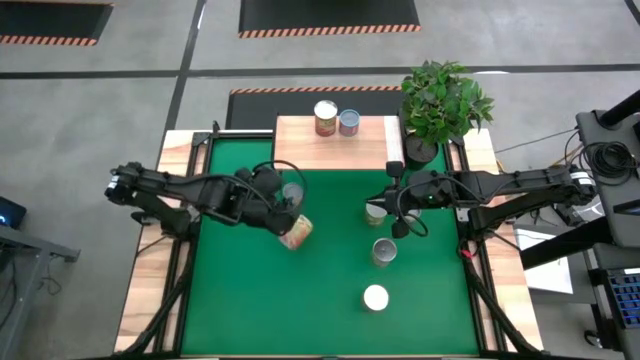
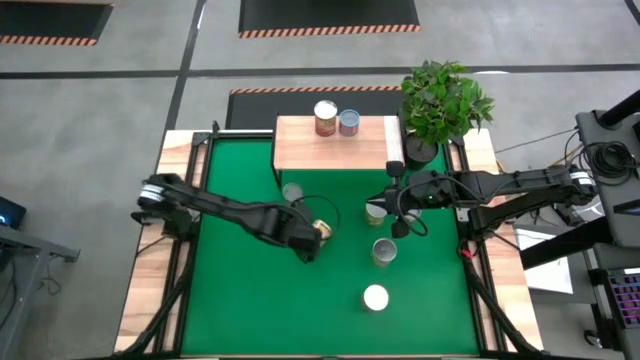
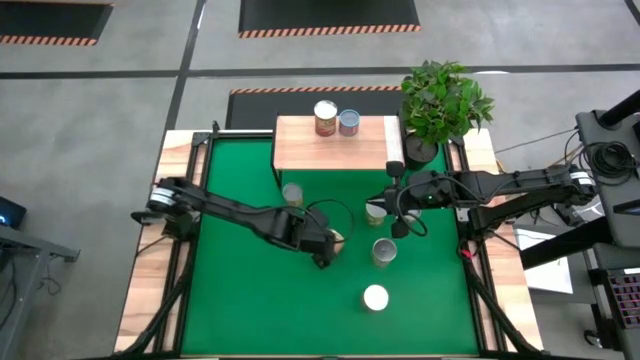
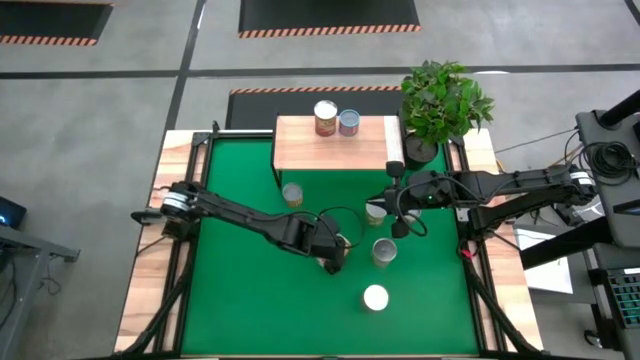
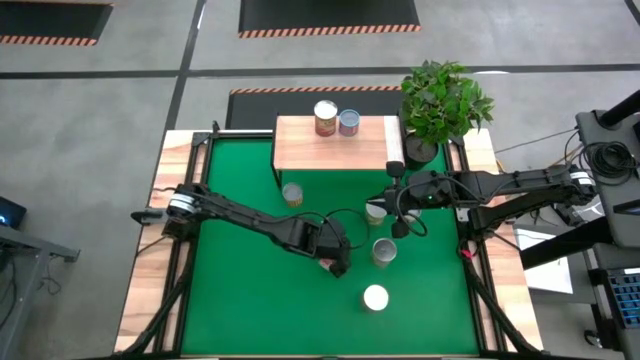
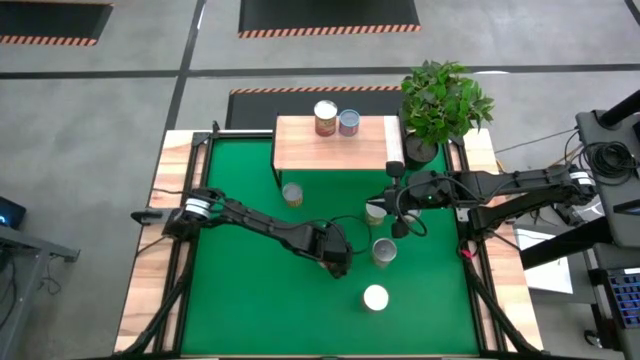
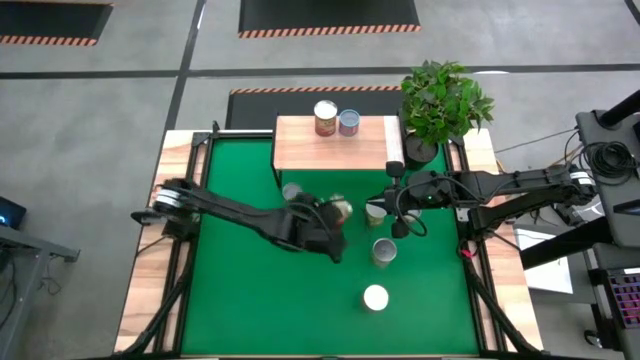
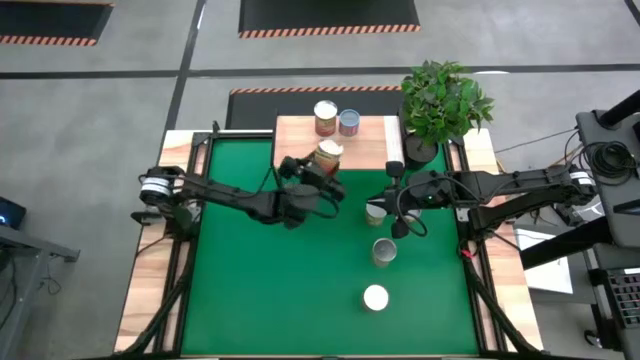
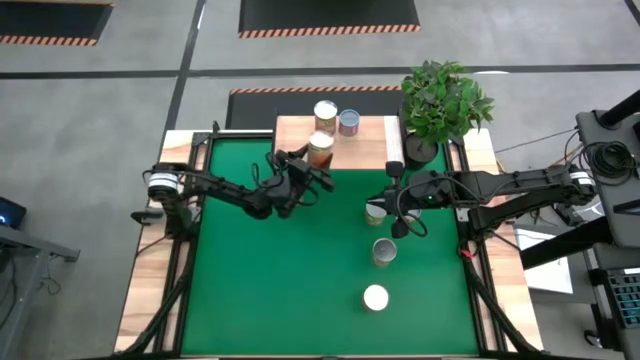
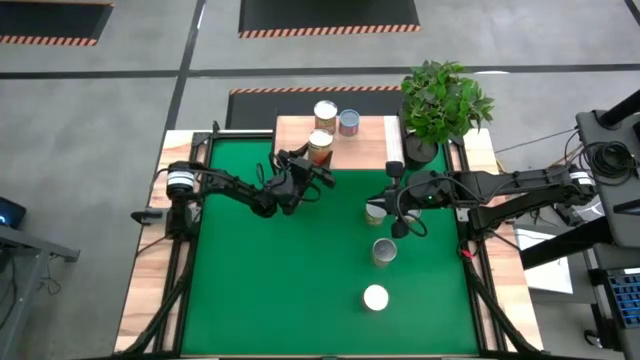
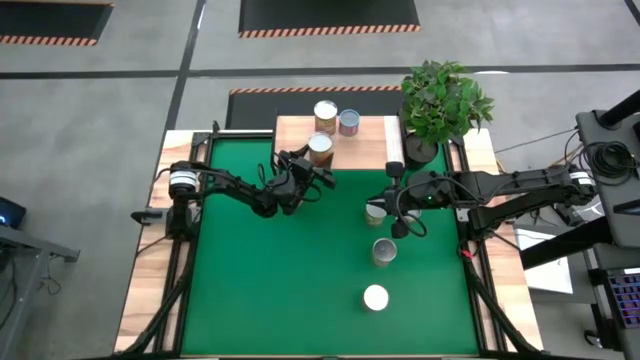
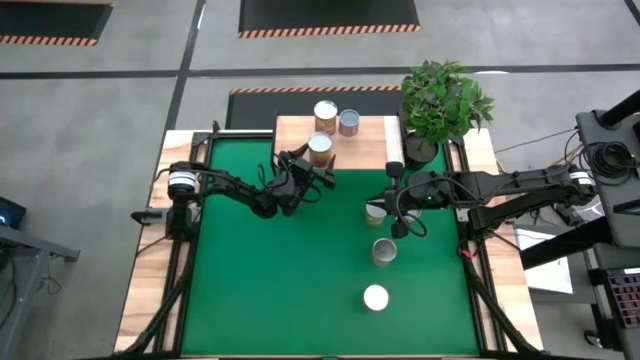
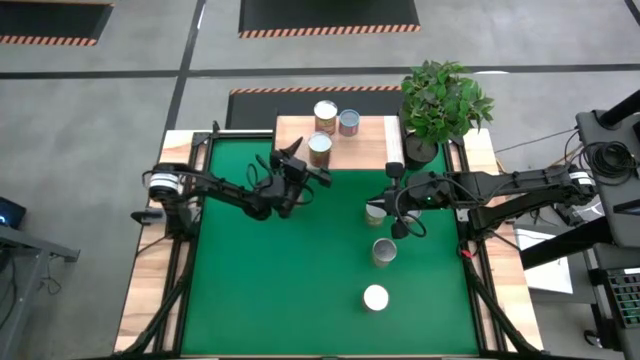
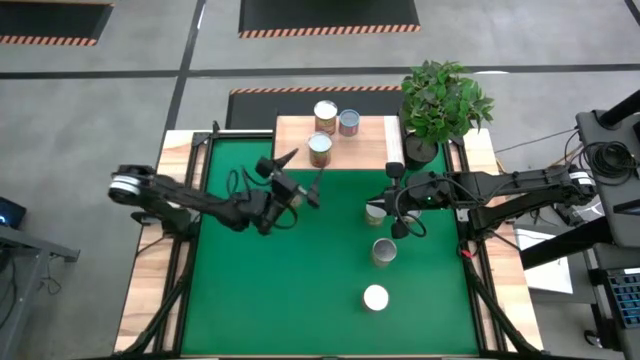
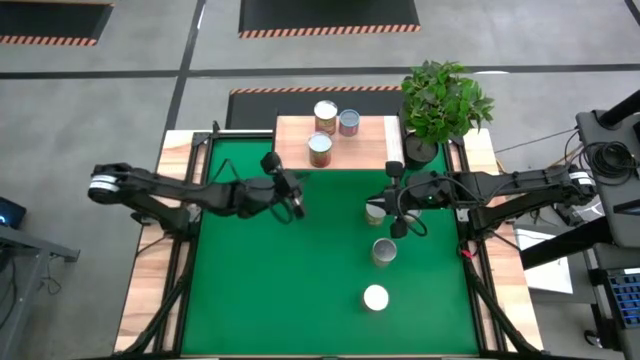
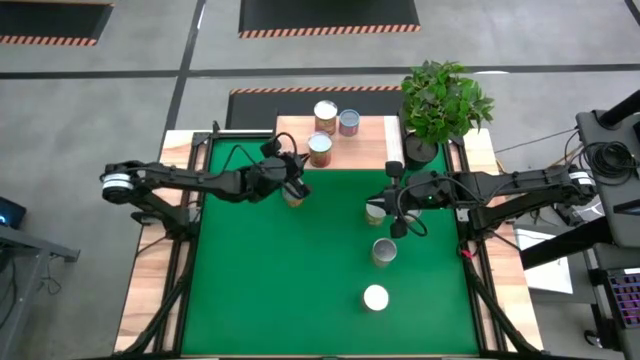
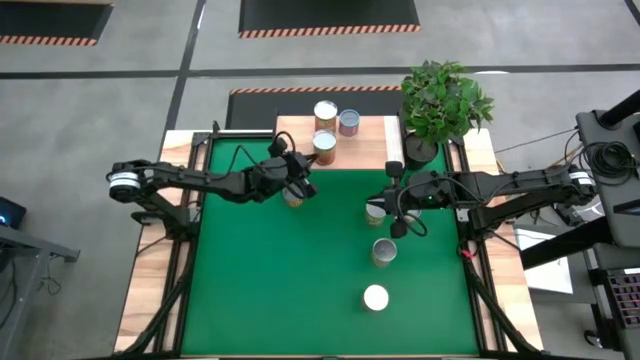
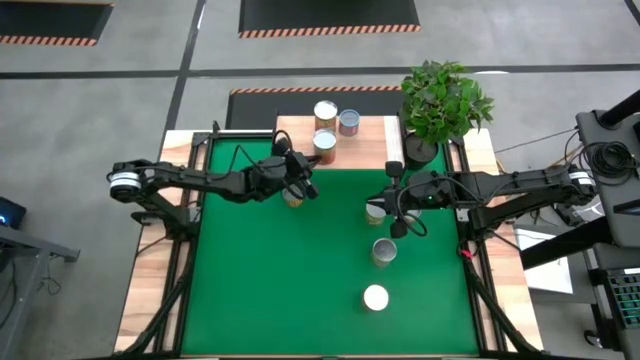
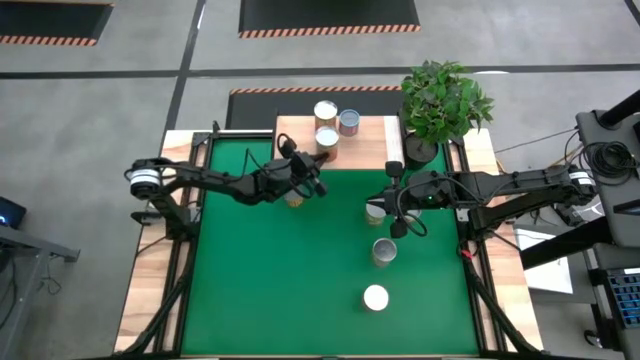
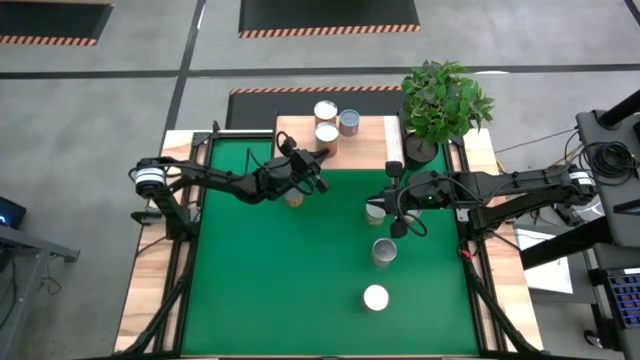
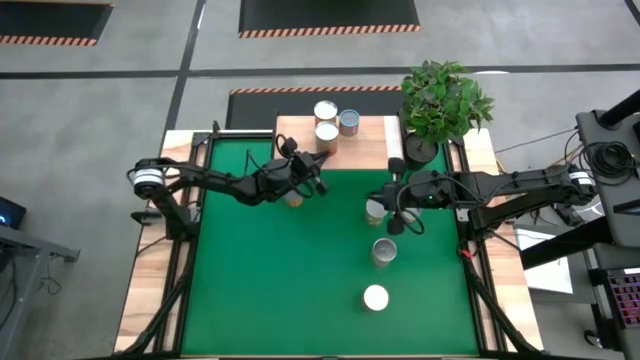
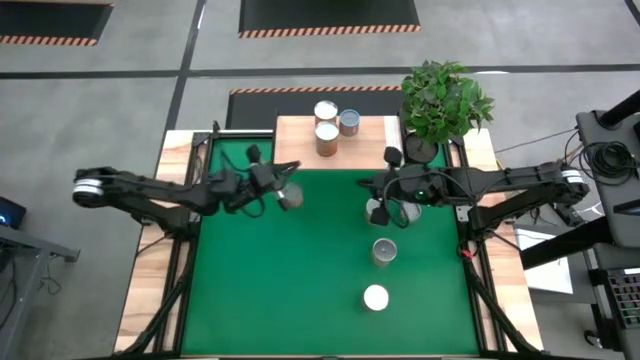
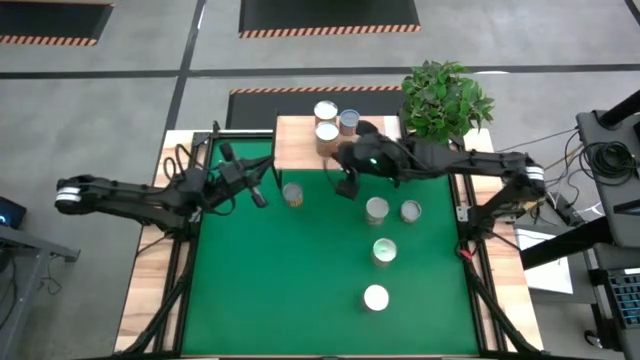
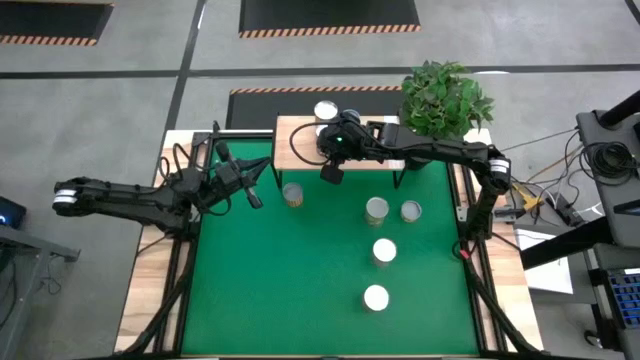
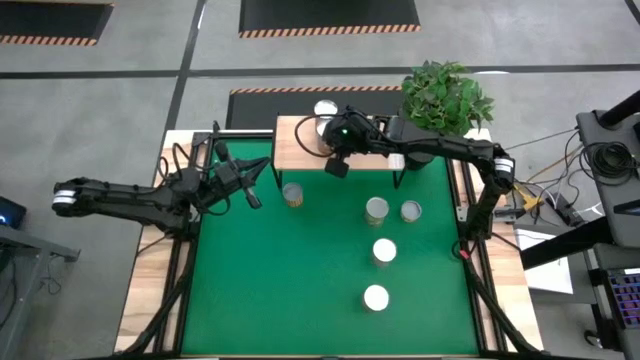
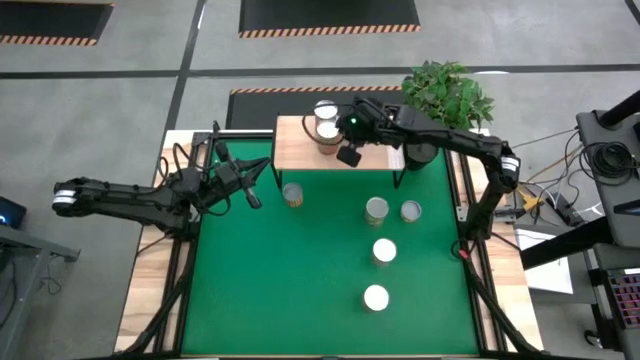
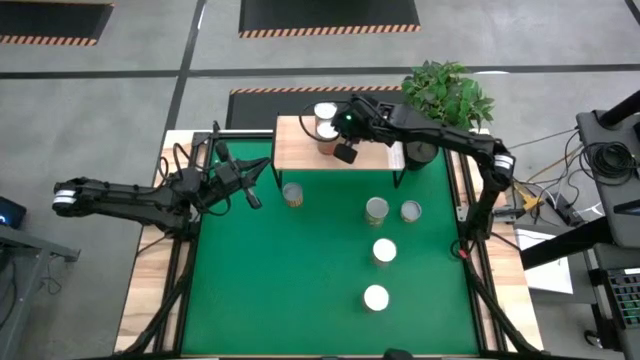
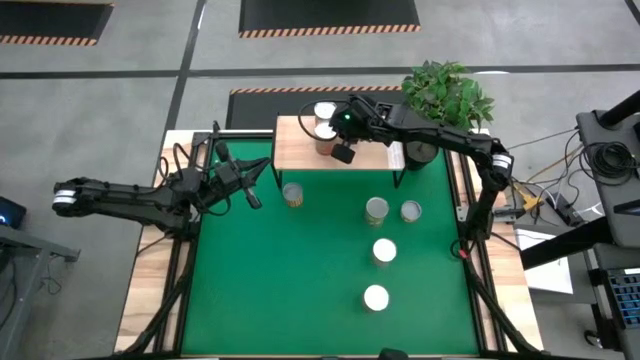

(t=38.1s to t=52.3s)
Task: Pick and place cans onto a shelf
Put the canned green beans on the shelf

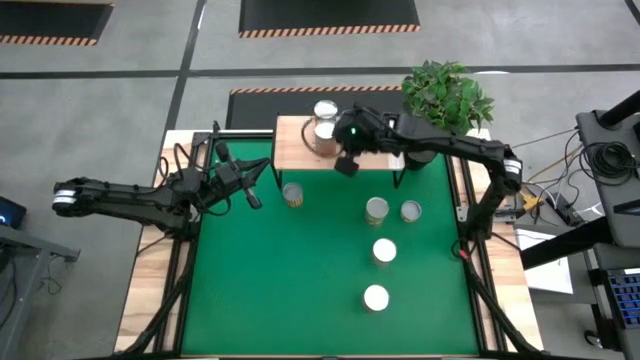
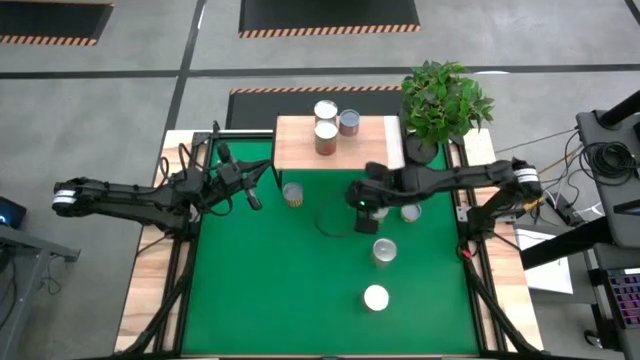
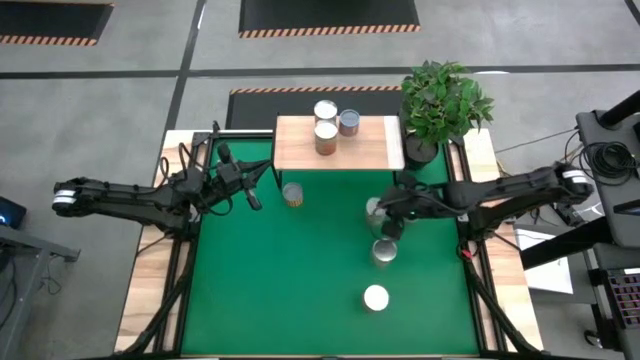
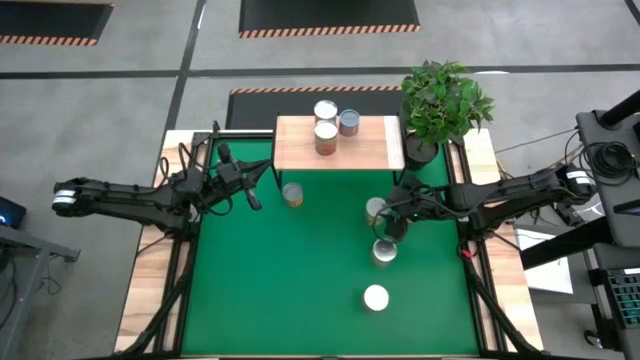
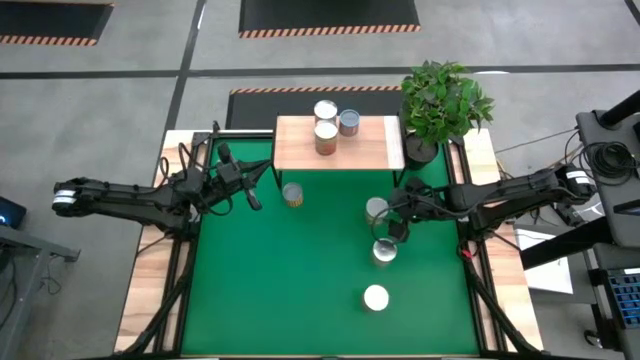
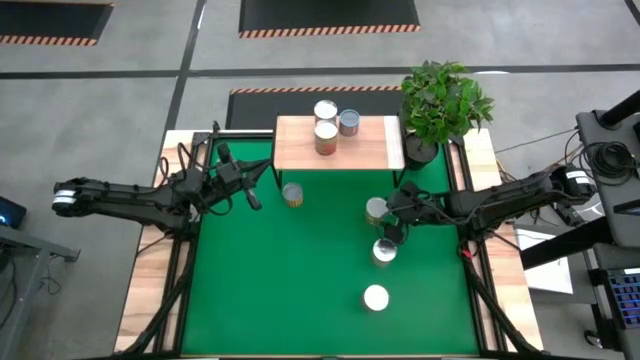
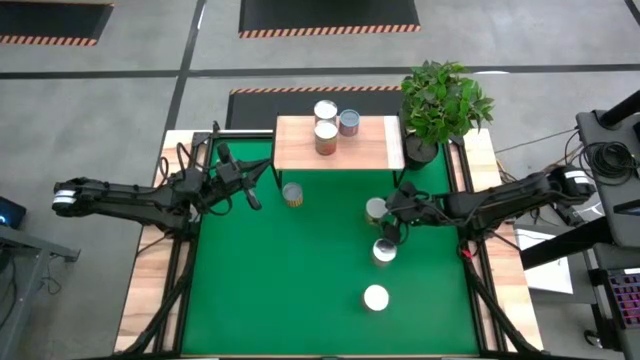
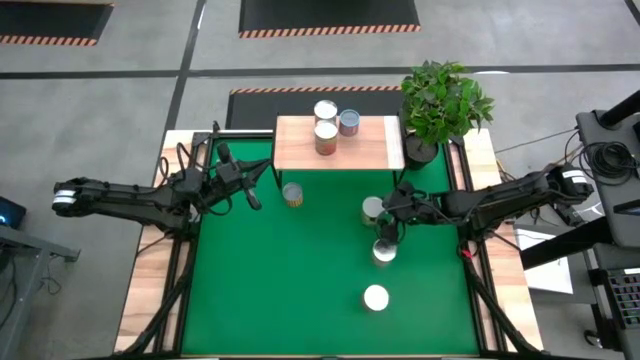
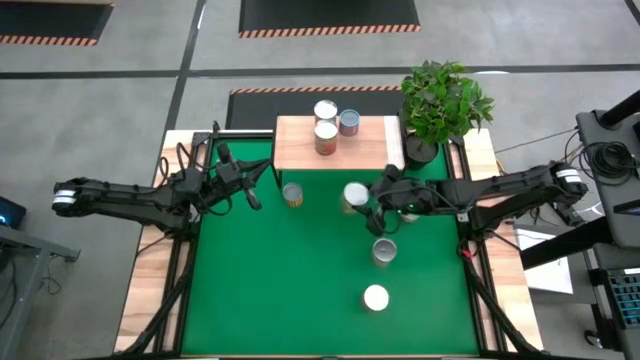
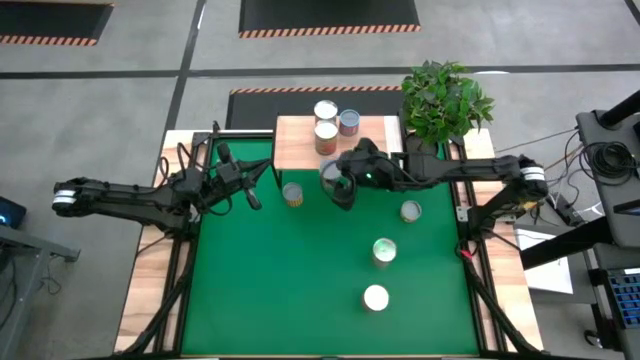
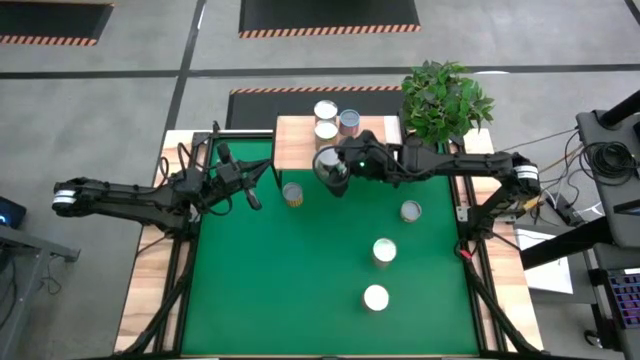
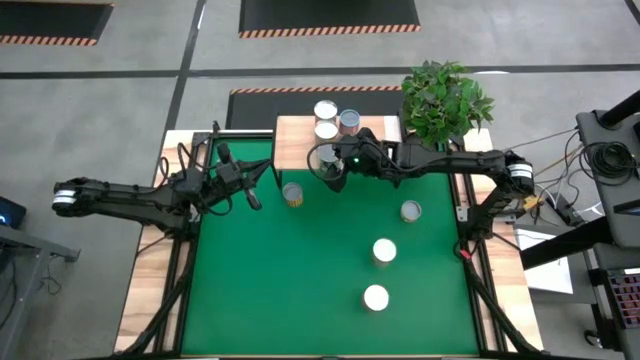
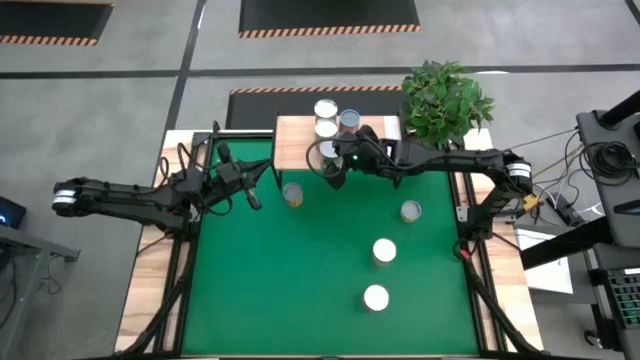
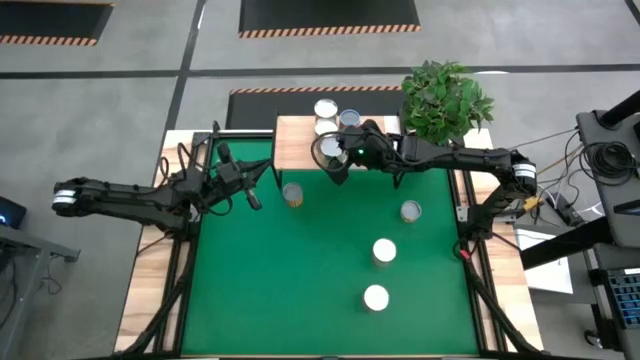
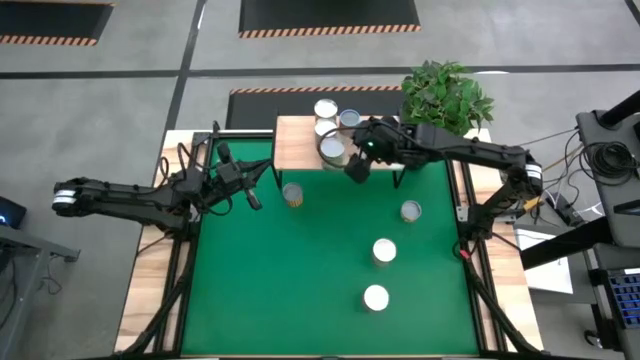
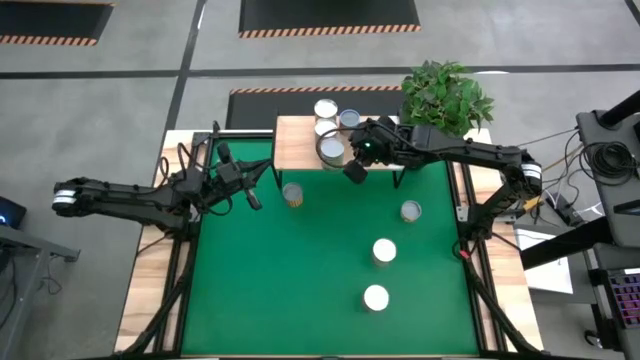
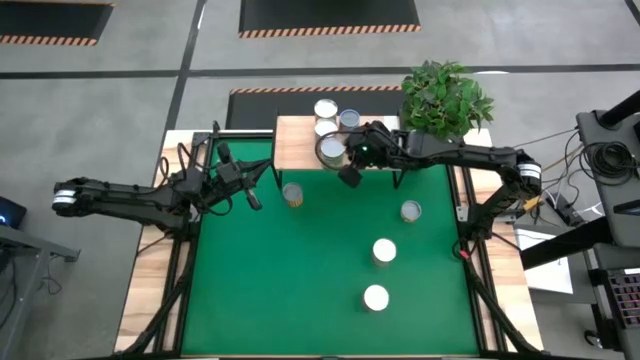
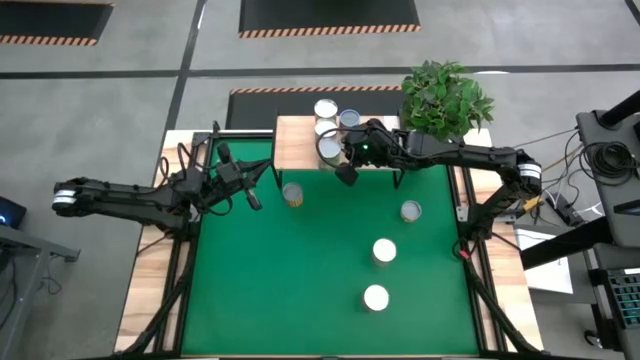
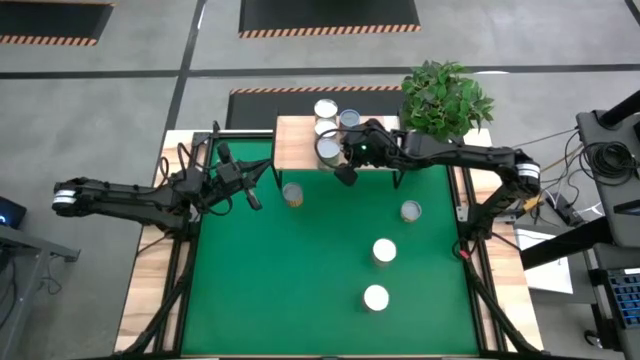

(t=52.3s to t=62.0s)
Put the canned pears on the shelf
